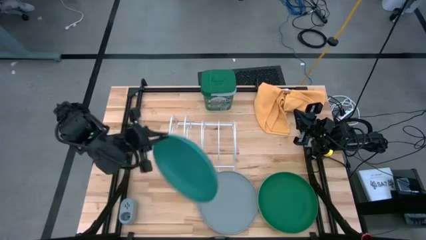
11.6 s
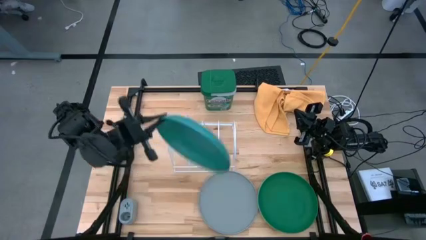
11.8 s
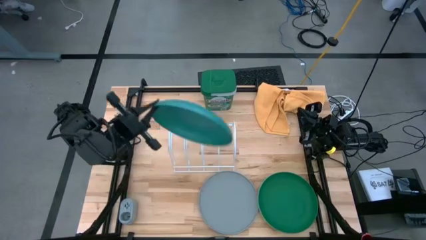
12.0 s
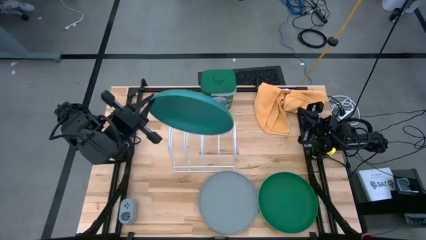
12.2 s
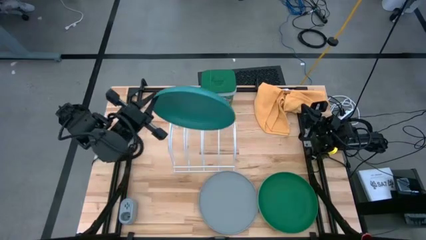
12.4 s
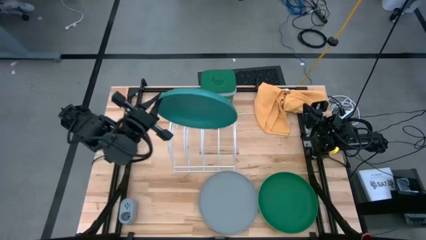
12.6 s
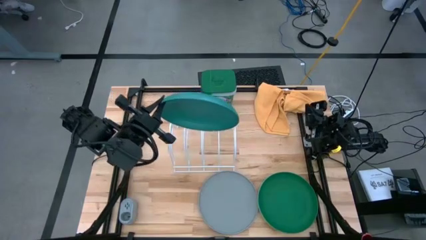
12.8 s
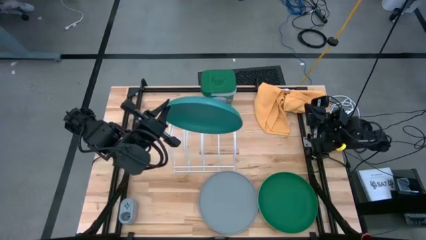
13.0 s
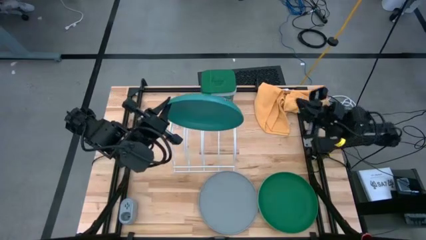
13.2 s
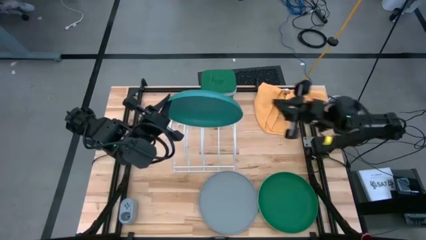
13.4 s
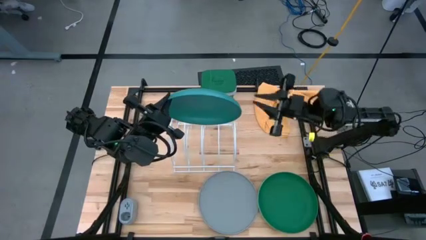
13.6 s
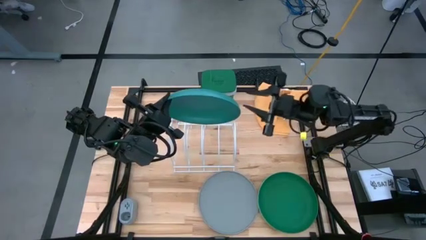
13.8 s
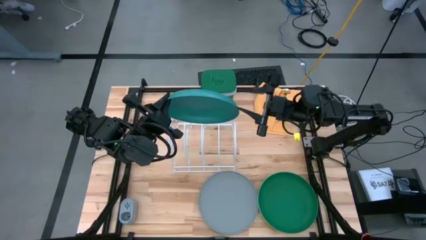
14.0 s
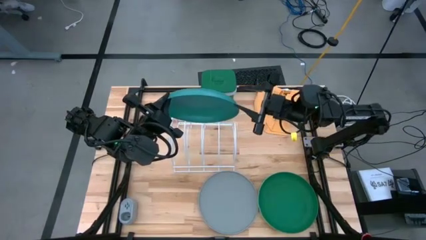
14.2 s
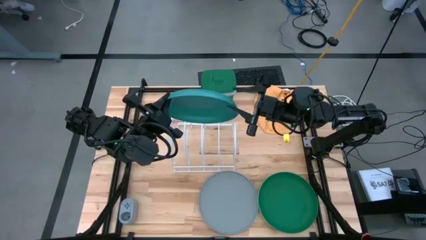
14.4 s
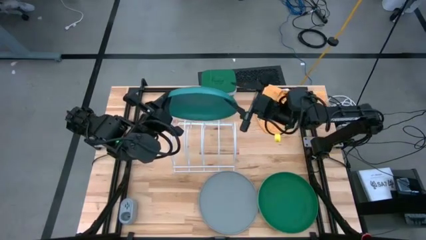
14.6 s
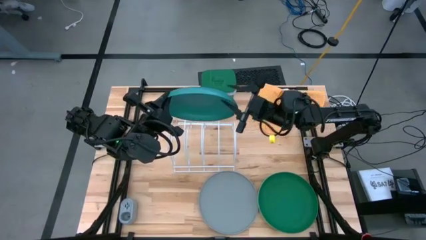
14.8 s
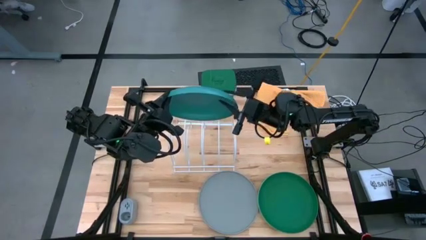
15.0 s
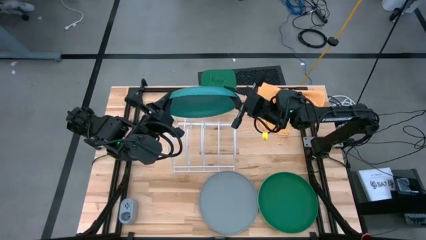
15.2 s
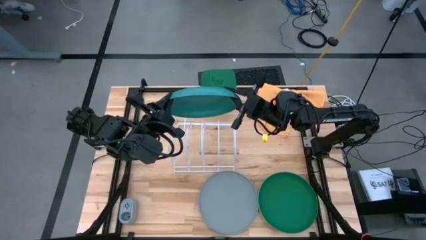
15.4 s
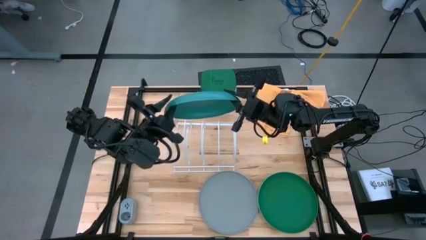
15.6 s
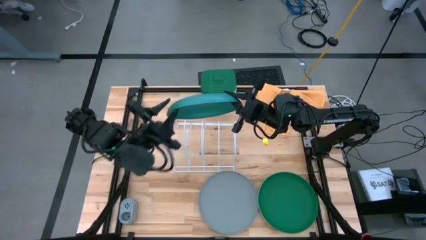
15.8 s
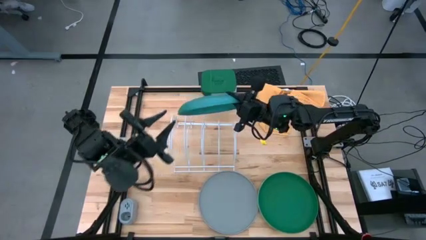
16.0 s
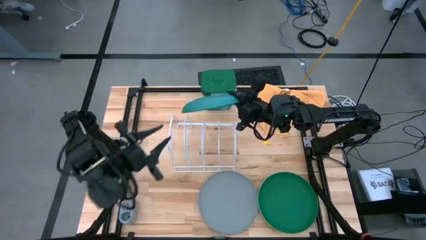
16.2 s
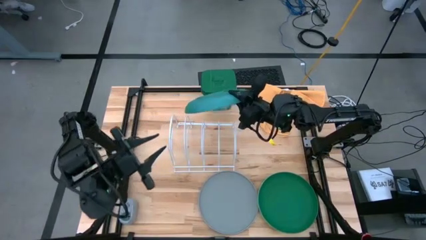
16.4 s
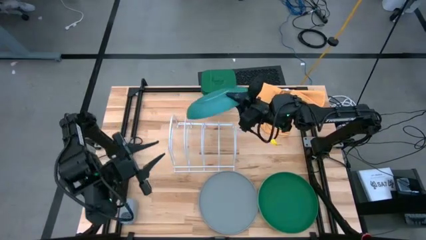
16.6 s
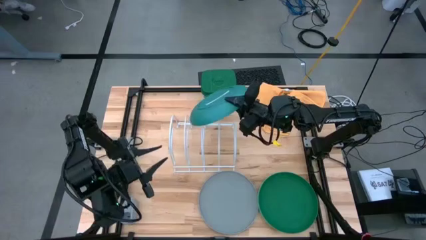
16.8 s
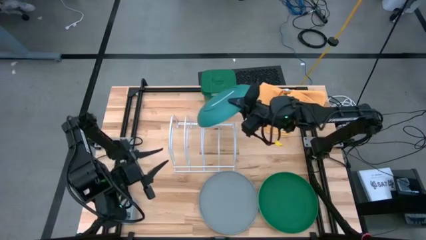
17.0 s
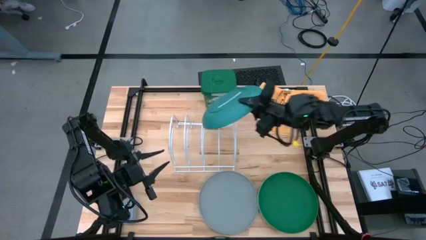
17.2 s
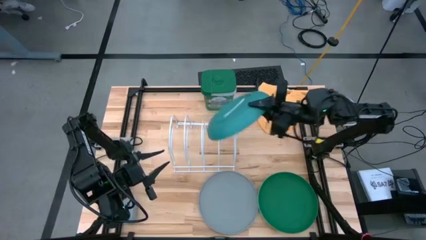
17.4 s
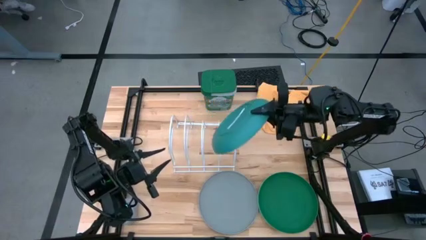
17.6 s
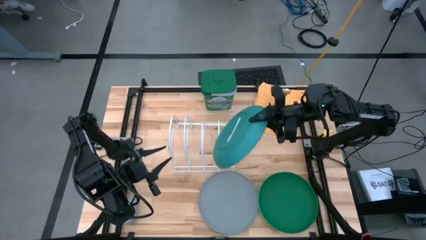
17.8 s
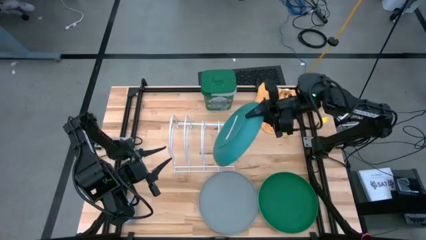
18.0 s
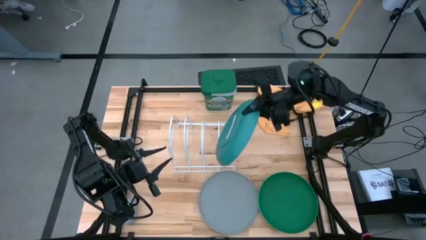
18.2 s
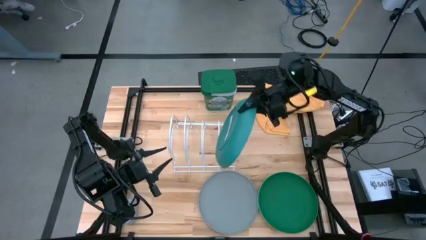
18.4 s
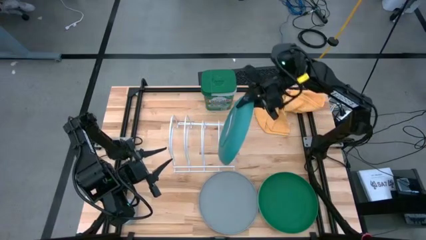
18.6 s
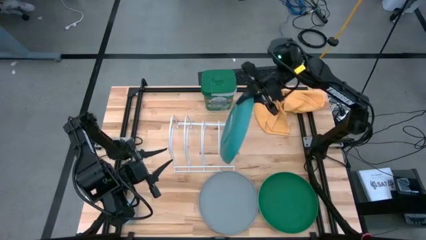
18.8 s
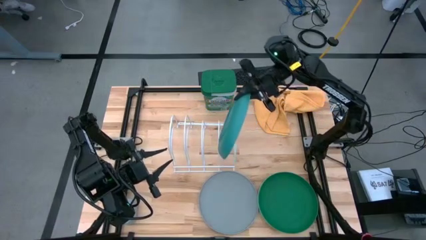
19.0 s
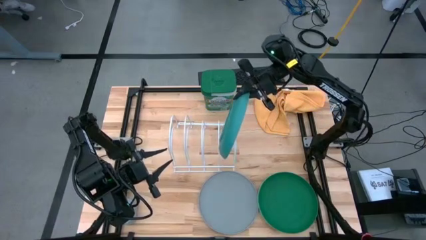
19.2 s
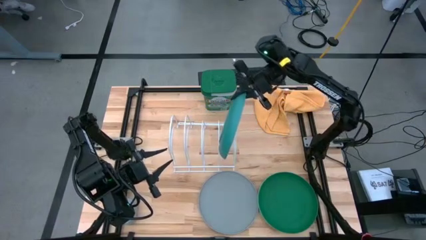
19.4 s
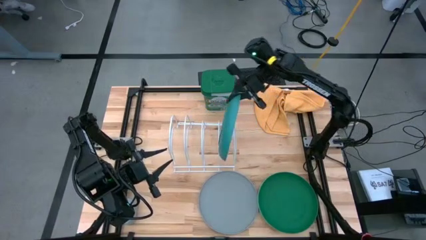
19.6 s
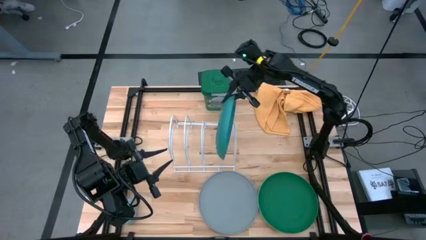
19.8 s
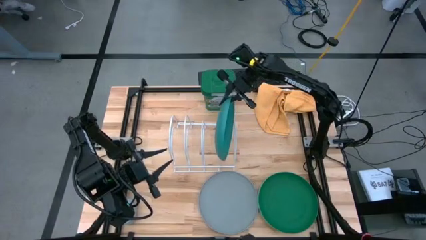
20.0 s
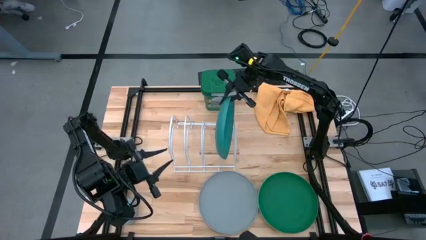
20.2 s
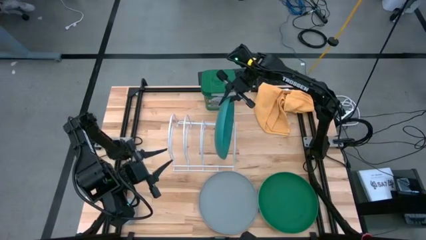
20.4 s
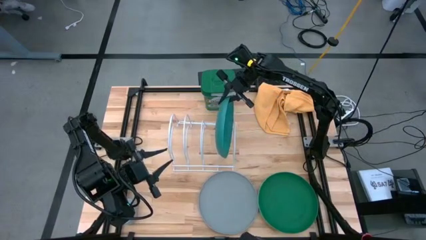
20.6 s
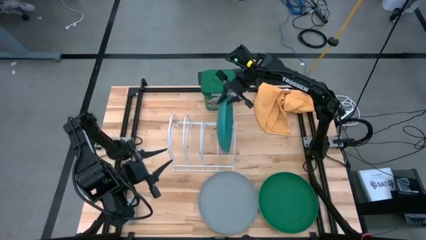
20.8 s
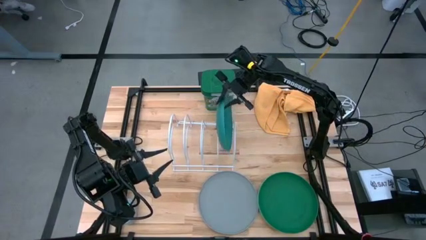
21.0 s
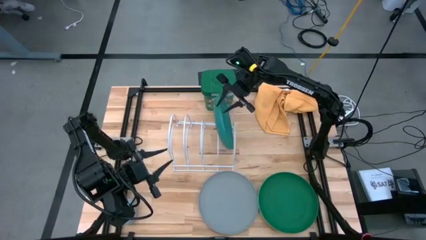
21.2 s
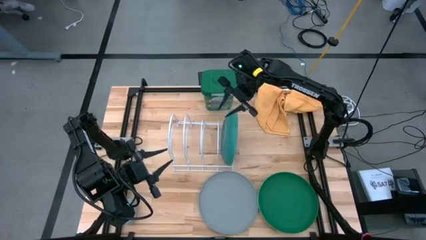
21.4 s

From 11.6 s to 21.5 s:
Task: Sort dishes
Put the green plate into the dish rack

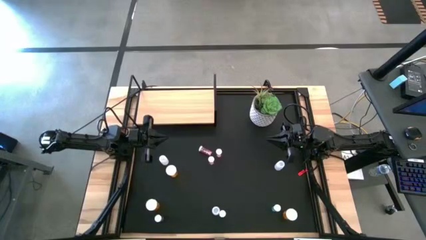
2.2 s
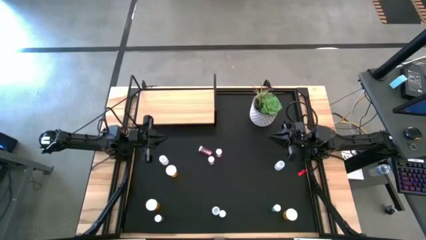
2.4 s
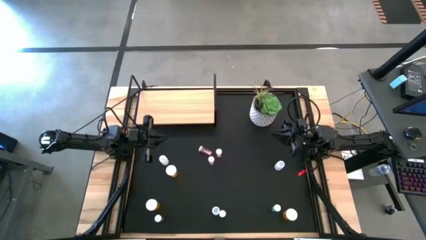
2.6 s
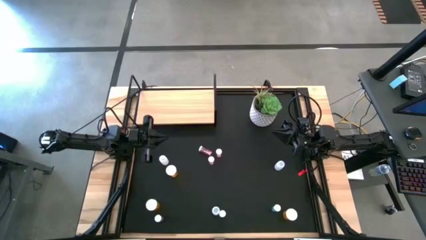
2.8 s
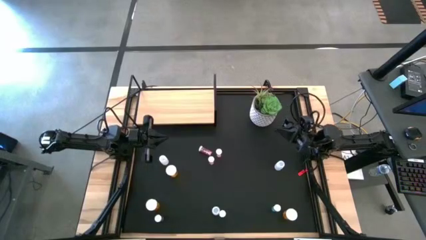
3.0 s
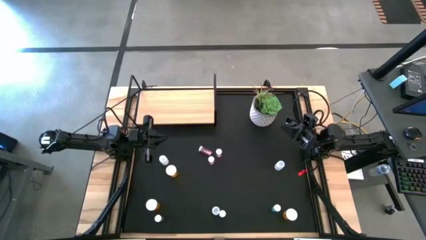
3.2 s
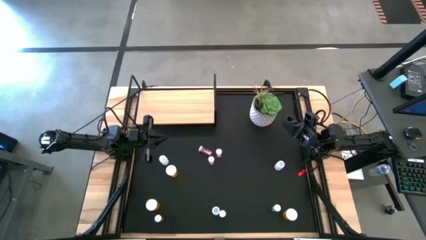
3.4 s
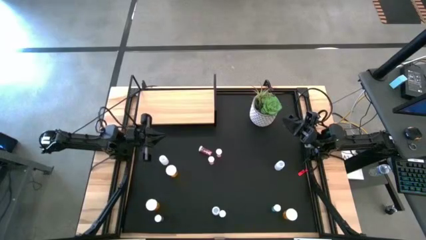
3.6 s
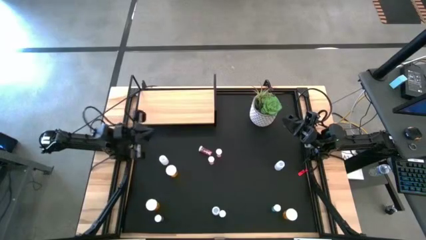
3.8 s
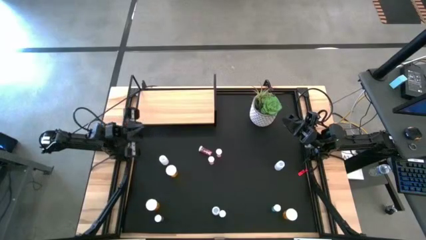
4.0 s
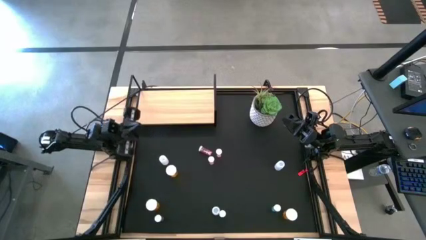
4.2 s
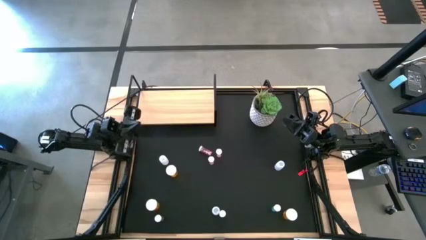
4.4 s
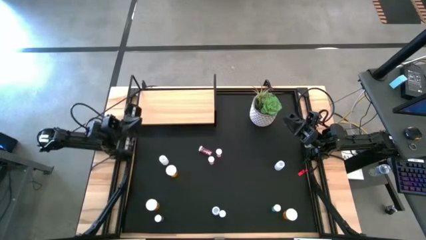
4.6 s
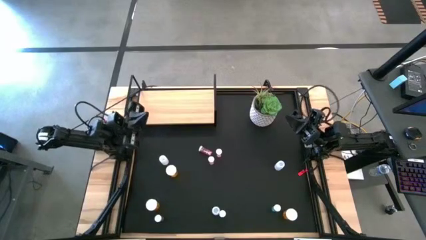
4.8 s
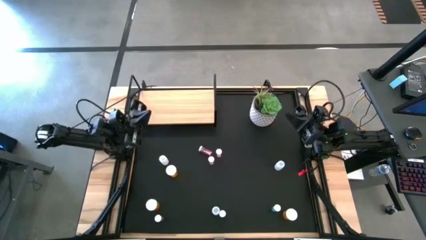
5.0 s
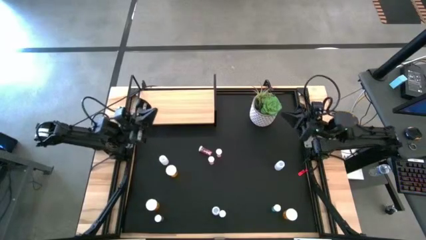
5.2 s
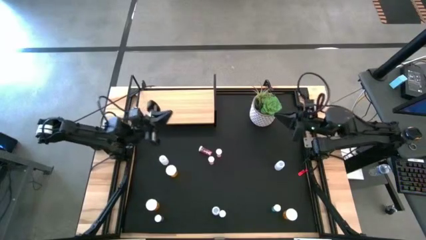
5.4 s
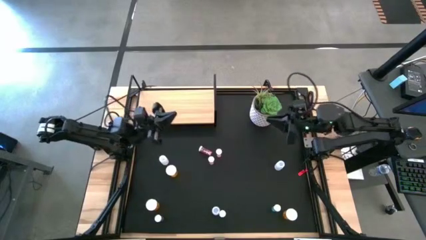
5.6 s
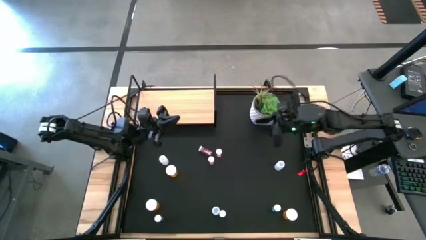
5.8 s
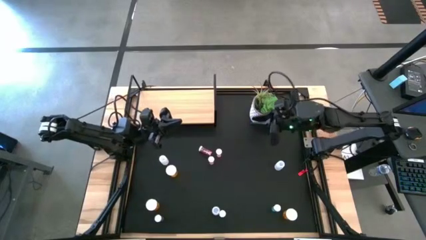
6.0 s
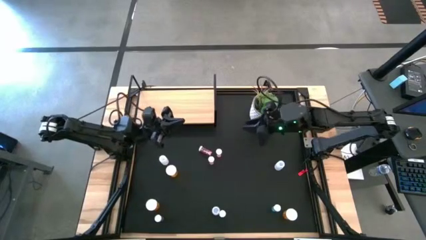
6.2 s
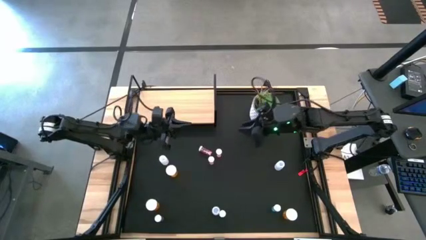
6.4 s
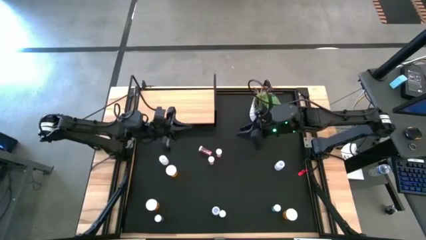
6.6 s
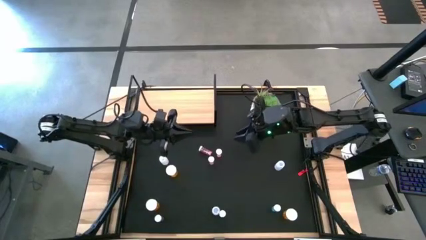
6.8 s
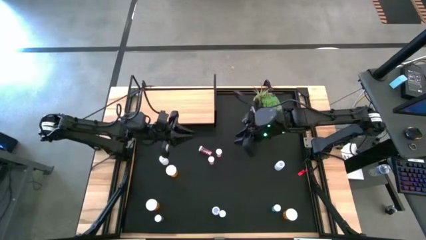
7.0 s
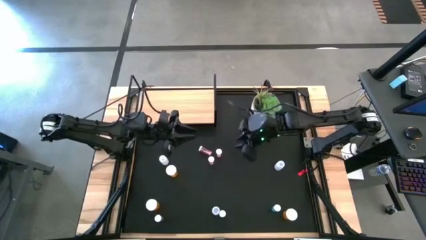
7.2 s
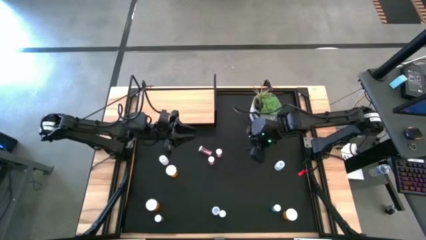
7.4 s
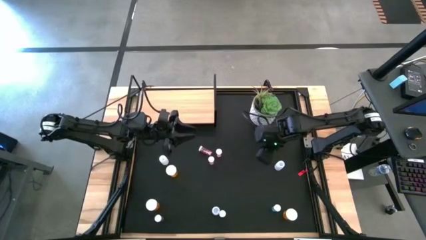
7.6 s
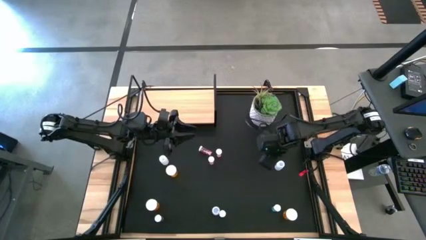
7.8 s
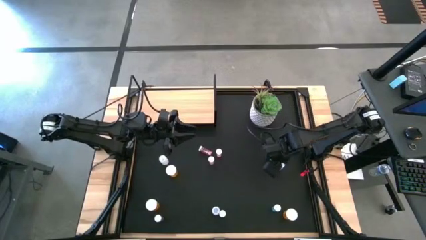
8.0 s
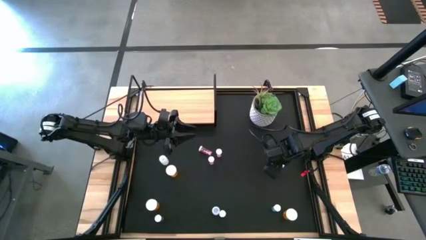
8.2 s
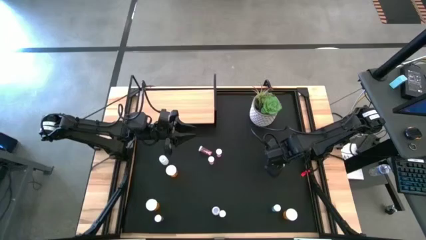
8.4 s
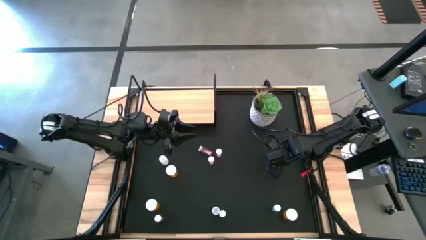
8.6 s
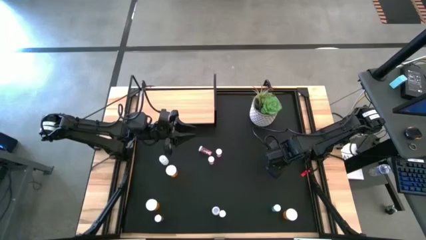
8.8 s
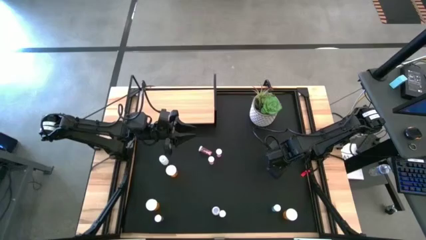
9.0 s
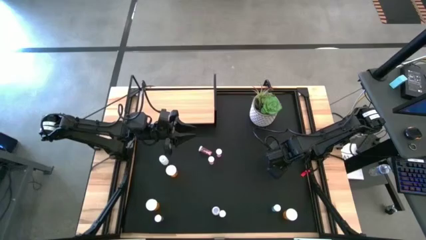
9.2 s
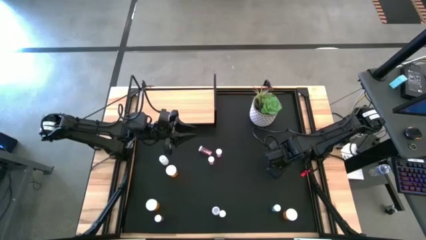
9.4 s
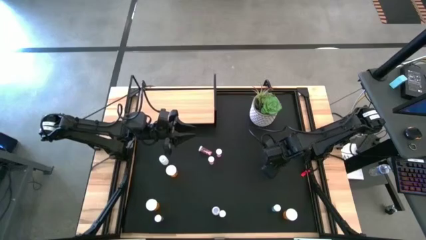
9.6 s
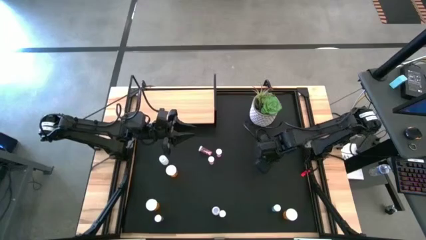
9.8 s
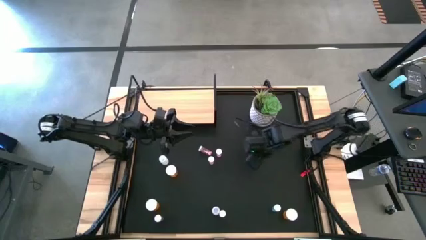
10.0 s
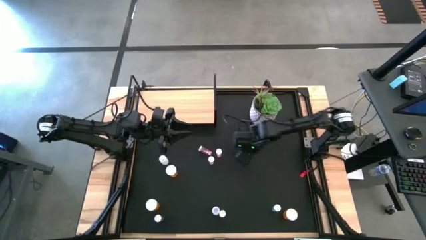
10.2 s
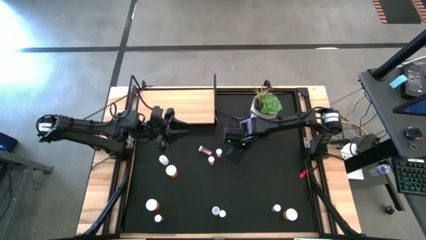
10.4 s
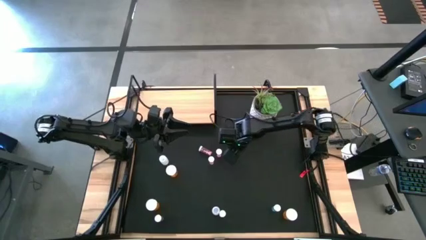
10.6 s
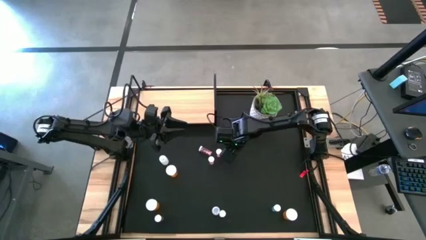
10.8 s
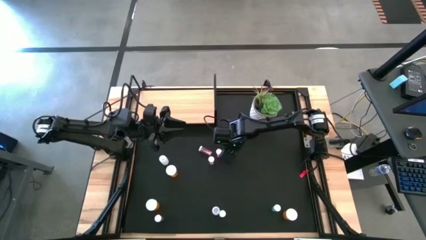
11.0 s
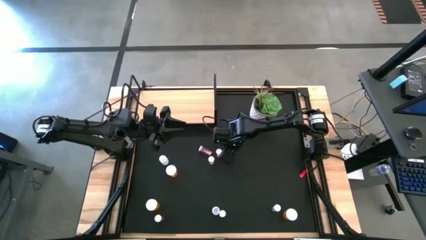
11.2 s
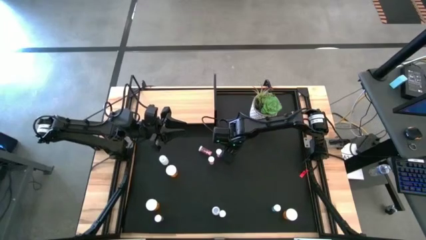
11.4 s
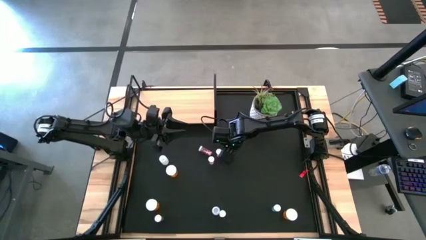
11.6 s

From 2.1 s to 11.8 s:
Task: Pick and place medicine bottles onto shelf by color
Move the white pill bottle to the center of the table
